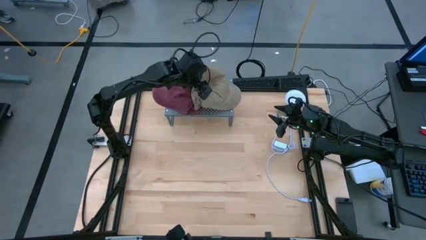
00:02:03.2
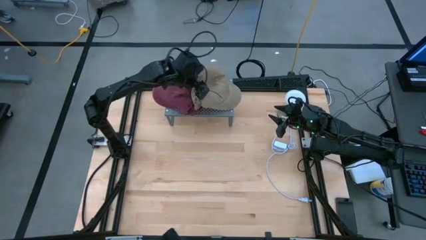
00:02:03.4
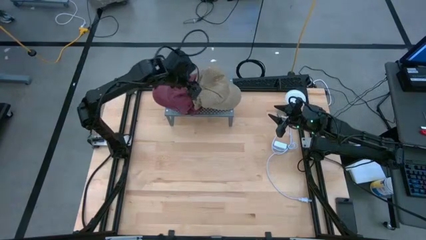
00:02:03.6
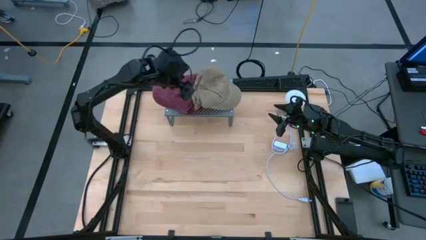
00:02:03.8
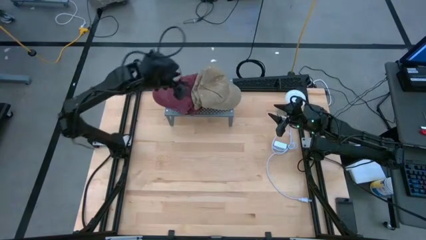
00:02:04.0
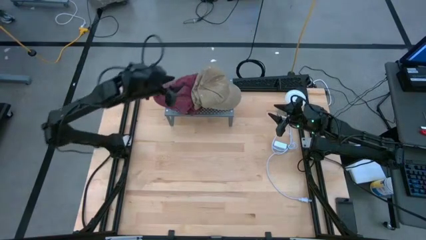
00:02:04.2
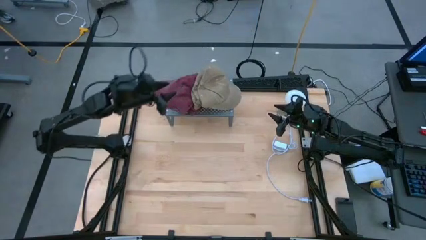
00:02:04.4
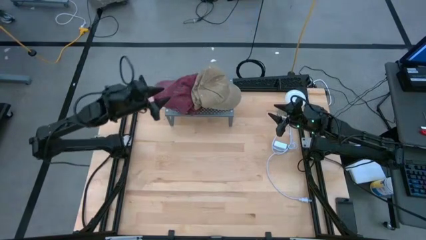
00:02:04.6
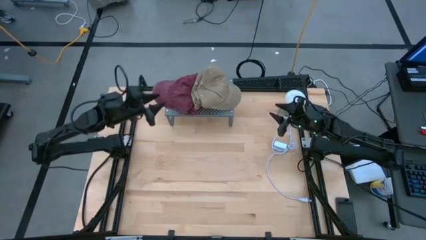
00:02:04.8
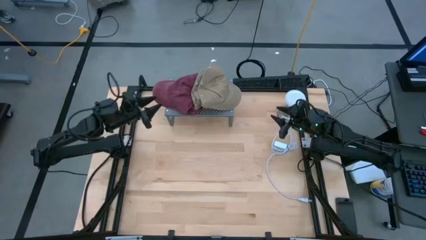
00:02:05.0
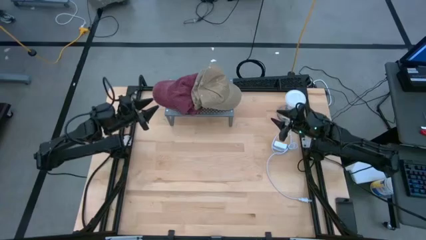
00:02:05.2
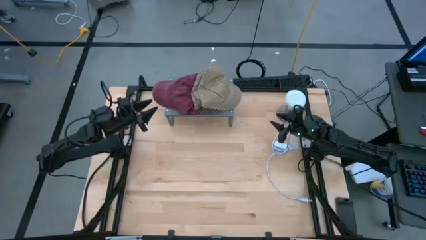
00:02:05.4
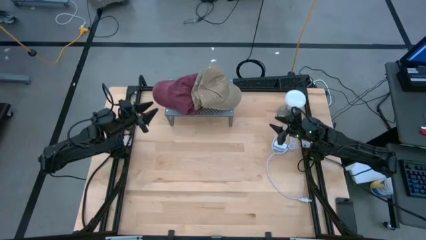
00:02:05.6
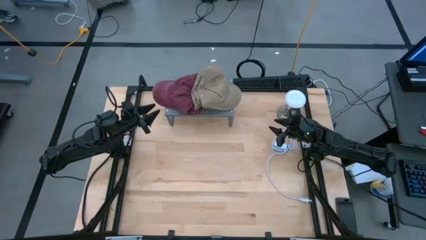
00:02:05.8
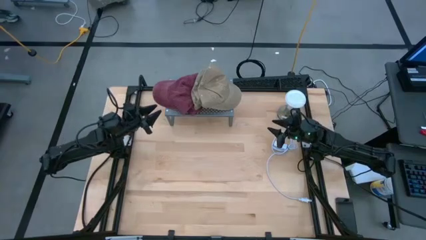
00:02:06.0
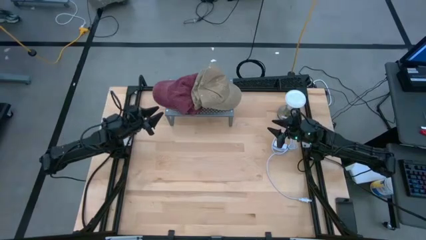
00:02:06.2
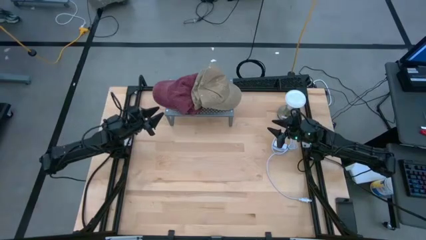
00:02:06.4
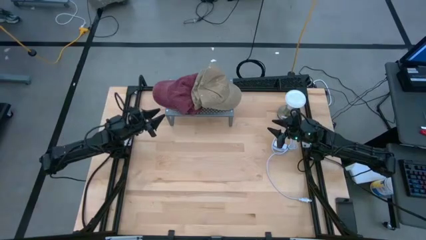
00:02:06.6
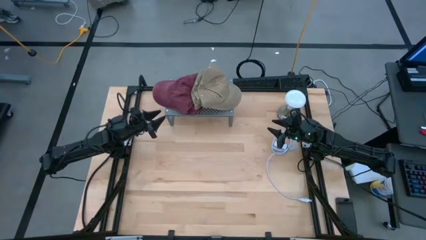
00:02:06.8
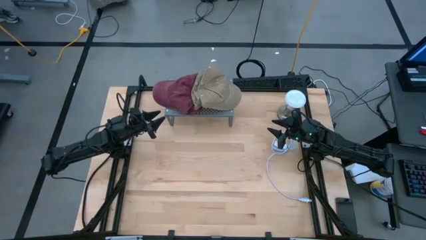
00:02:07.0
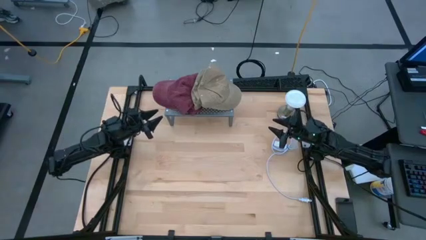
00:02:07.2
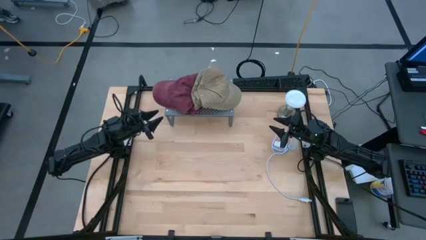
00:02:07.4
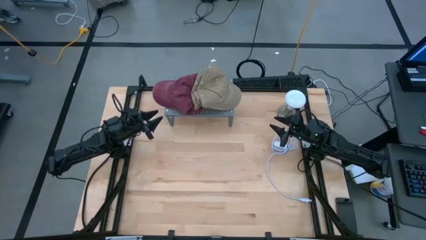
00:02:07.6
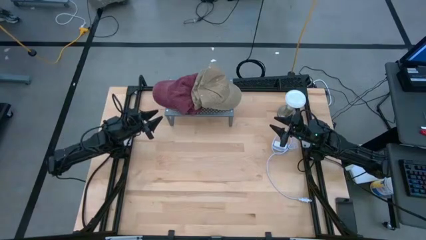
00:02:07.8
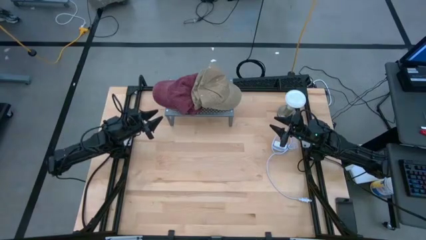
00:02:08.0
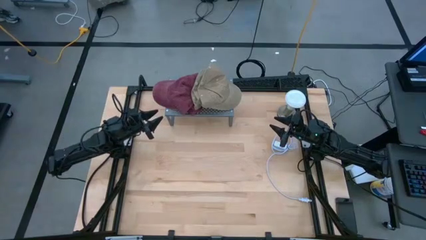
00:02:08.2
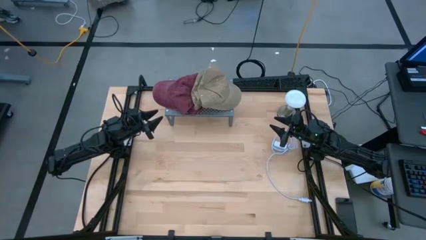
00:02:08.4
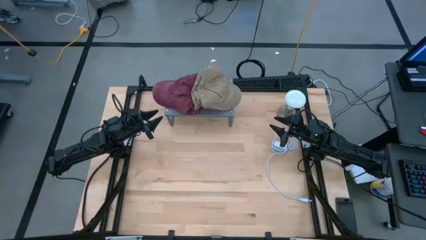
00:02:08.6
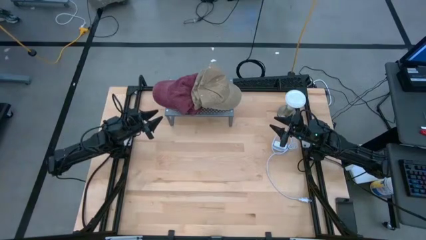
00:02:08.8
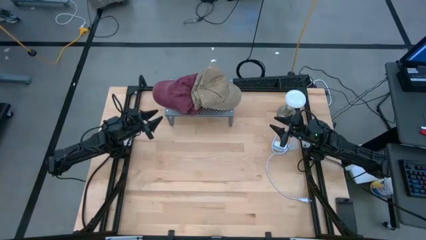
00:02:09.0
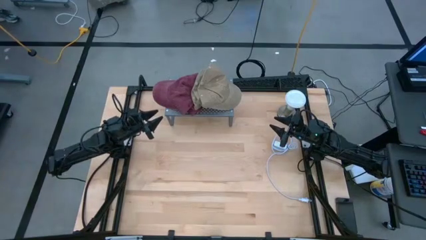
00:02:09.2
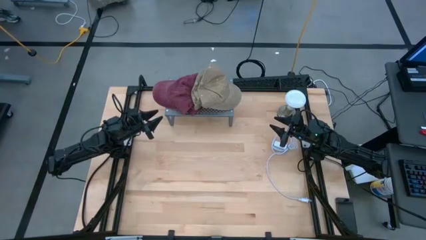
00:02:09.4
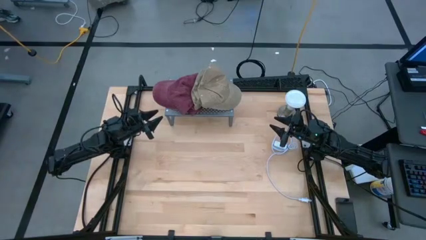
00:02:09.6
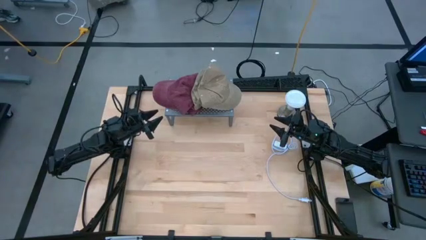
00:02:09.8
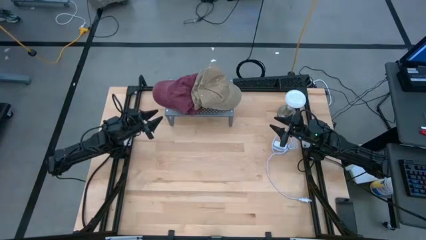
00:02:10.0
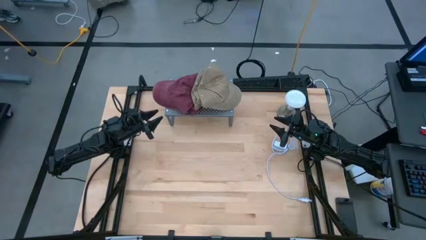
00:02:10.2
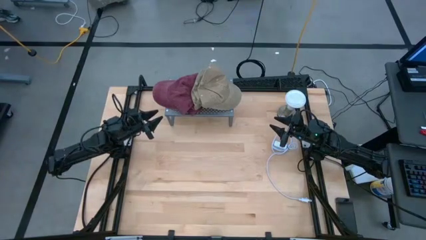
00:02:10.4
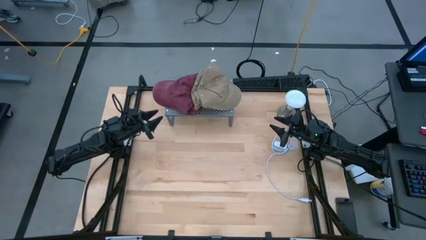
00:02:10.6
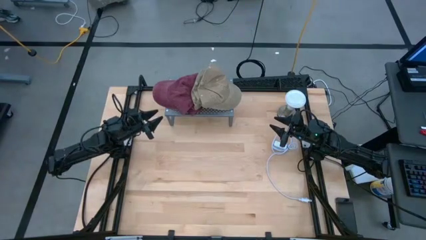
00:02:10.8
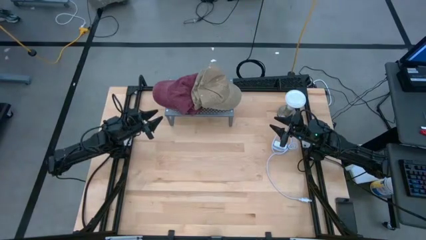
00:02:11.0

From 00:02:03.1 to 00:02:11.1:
Task: Pick & Place hat
Return to Home Position

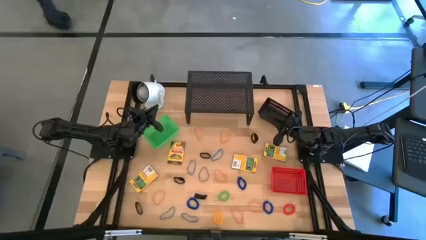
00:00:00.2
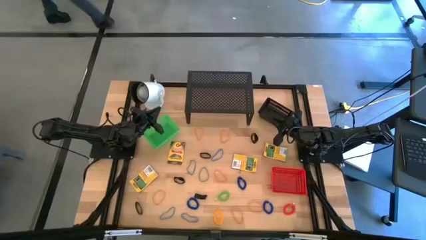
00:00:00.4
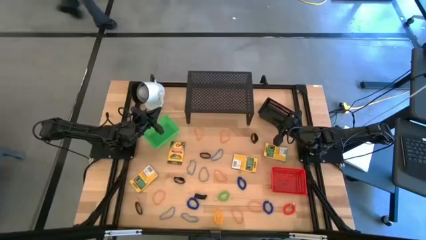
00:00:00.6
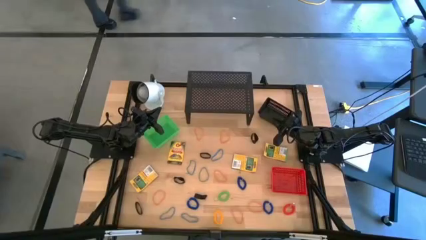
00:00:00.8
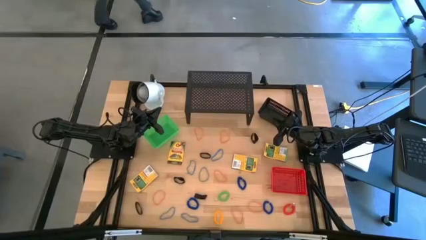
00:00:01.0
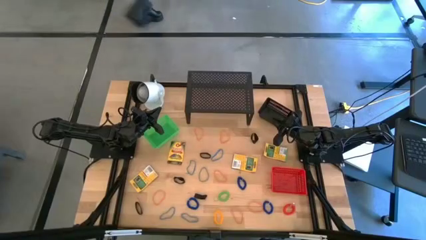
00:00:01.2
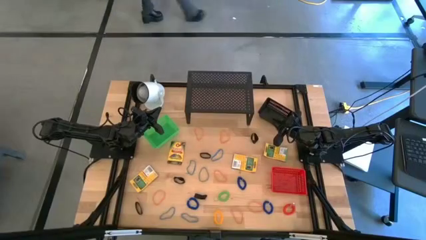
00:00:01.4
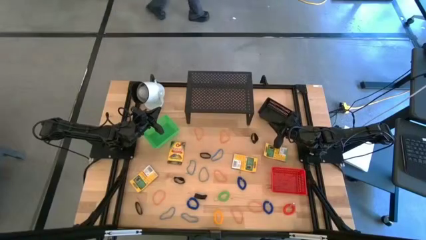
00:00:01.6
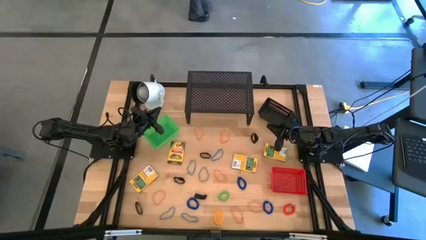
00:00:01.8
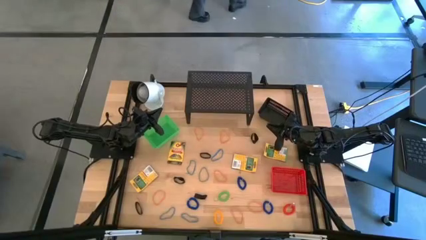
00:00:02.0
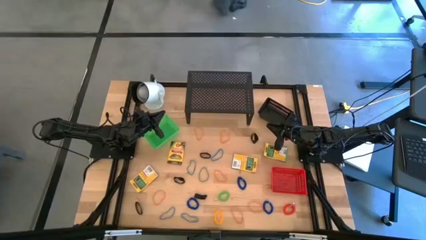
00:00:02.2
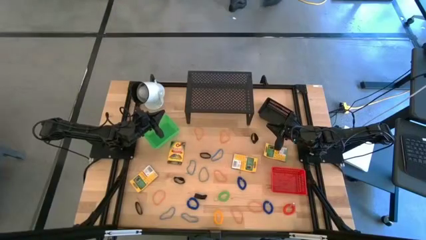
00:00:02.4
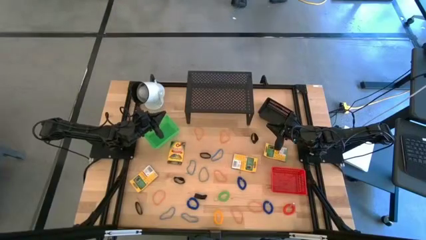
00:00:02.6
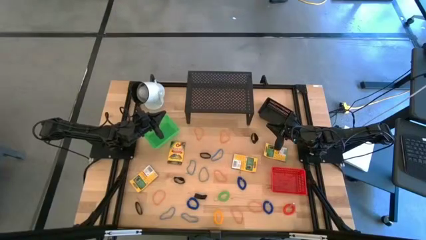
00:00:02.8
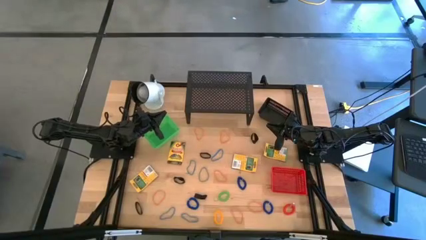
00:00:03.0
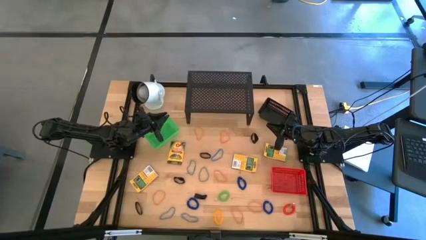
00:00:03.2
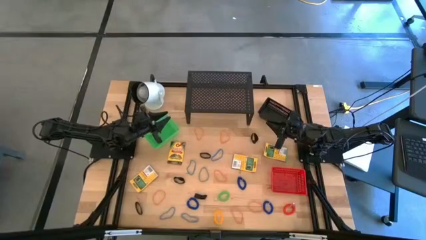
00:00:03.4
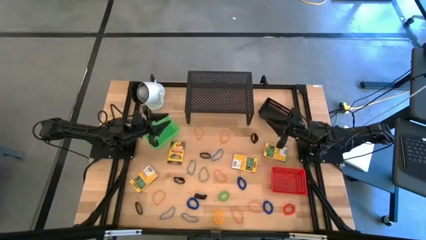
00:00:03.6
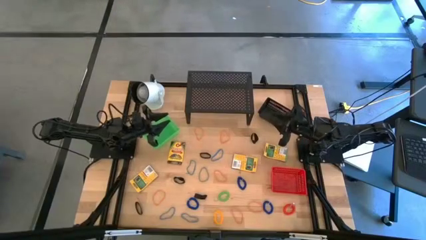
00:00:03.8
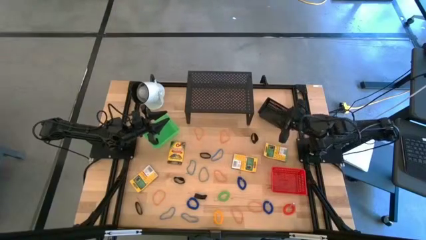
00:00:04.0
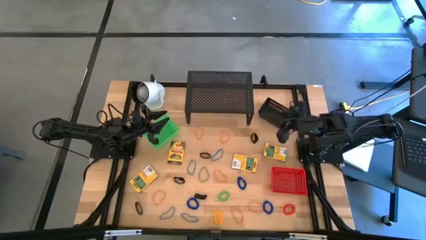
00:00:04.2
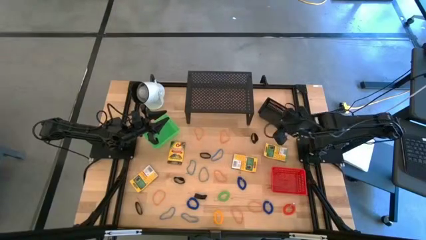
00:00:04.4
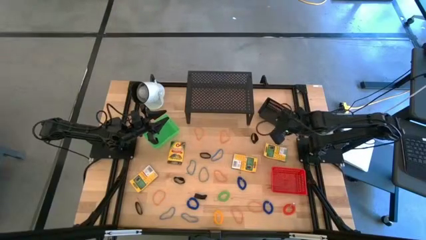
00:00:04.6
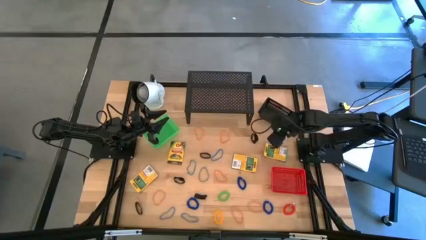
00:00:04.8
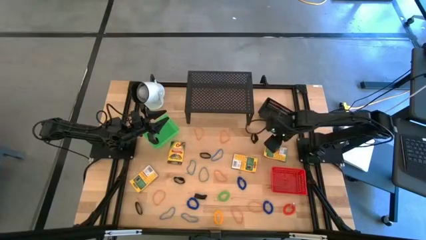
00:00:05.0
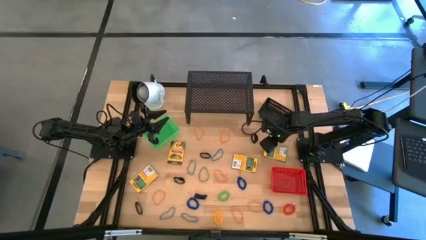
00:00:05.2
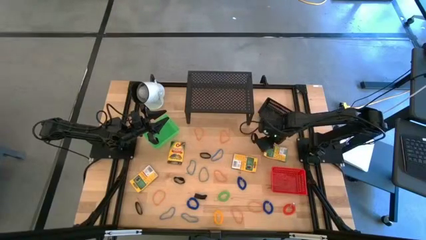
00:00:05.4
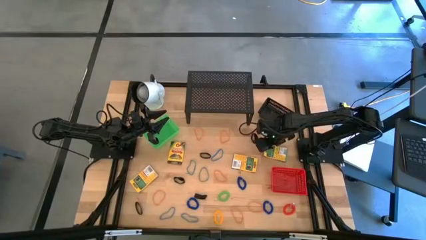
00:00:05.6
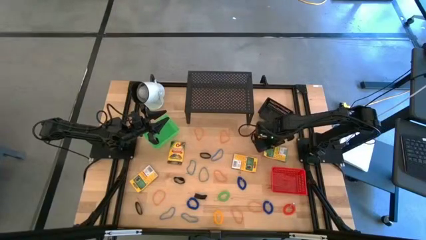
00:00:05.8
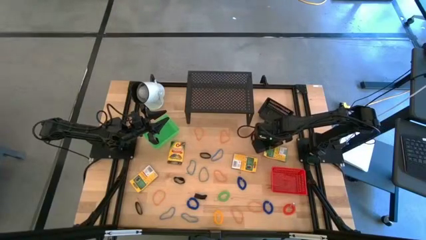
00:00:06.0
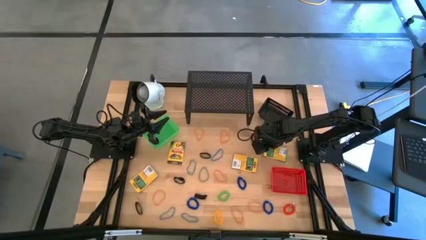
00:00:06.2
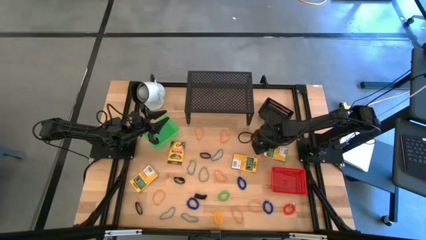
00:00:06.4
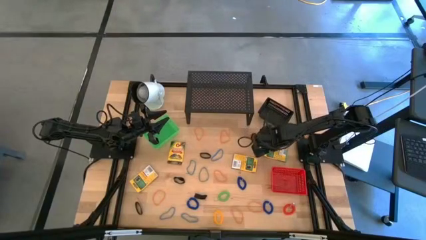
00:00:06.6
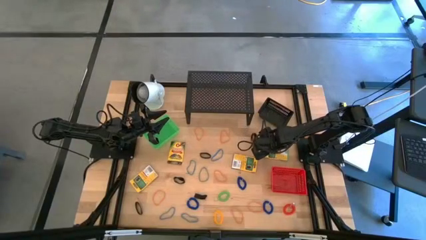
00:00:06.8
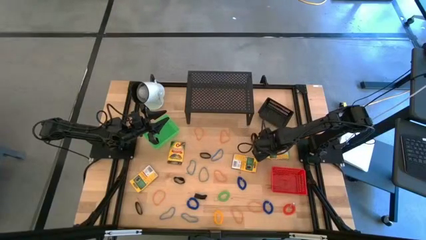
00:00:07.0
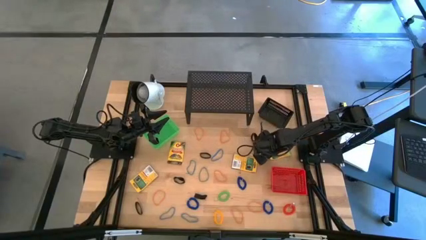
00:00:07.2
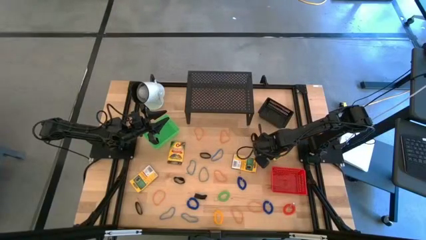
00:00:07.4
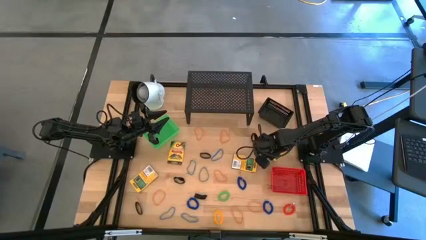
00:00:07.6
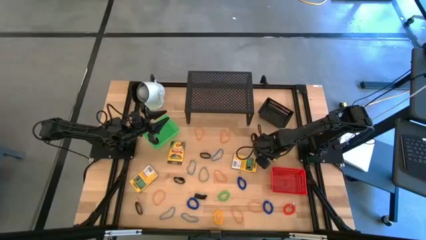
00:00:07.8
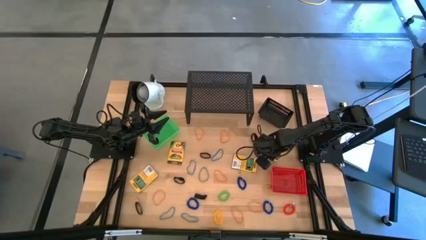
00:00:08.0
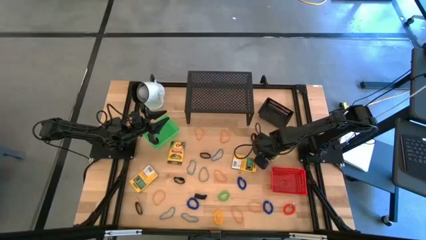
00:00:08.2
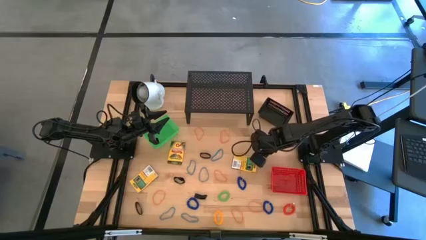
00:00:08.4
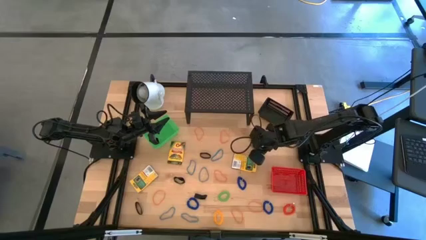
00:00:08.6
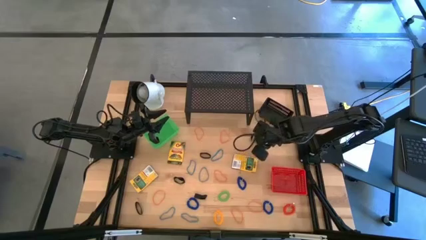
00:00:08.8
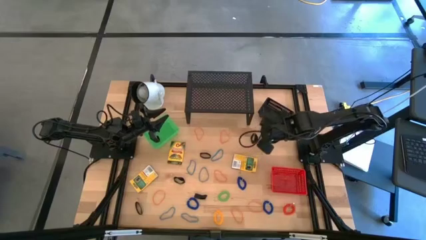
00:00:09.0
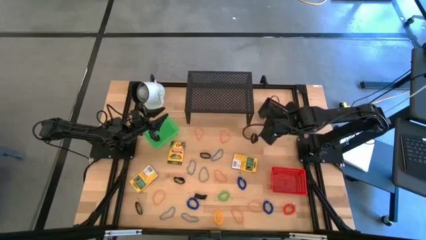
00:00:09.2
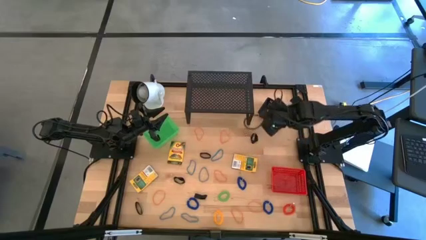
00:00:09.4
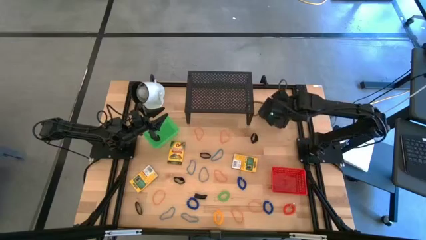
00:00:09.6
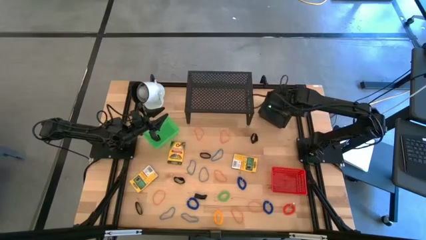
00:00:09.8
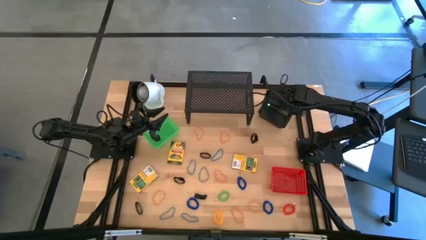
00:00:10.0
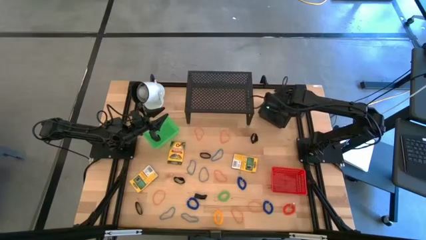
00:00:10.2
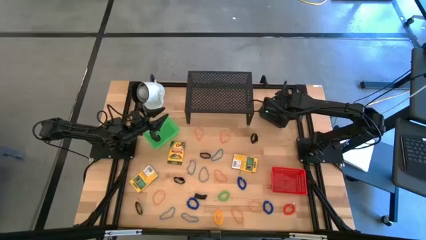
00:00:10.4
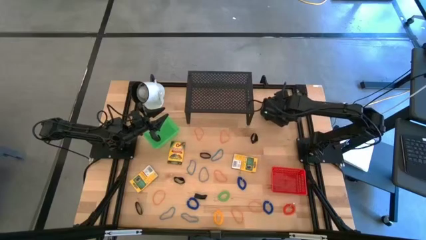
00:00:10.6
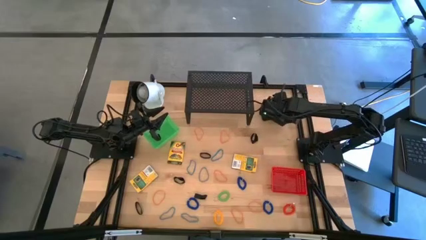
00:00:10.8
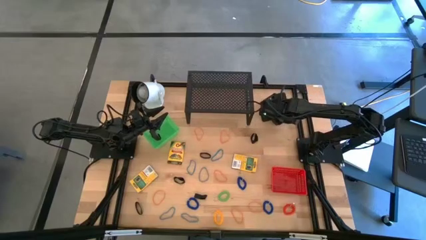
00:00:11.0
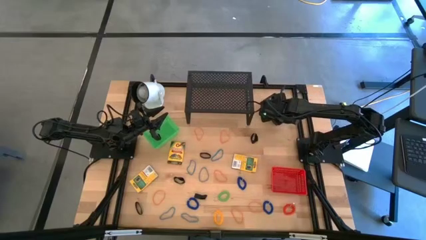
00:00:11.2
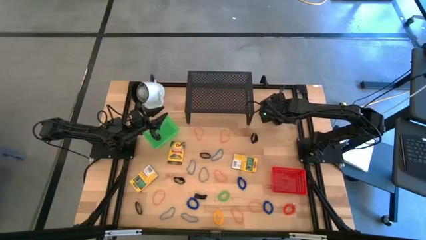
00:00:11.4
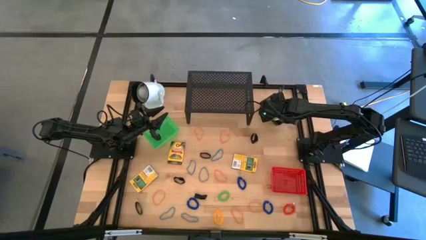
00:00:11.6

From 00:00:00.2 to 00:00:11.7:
Task: Pick & Place Office Desk Supplies
Put the crayon box into the black bin
